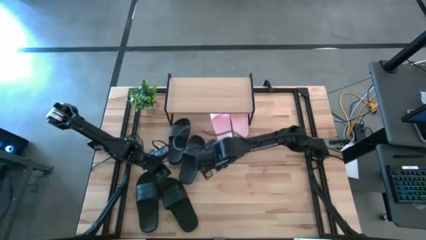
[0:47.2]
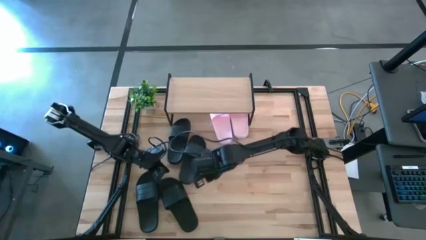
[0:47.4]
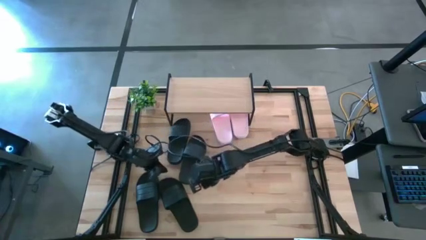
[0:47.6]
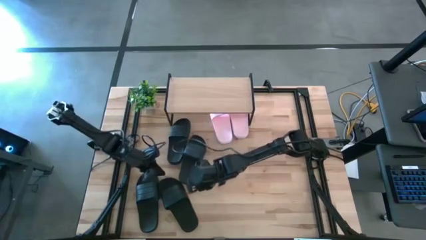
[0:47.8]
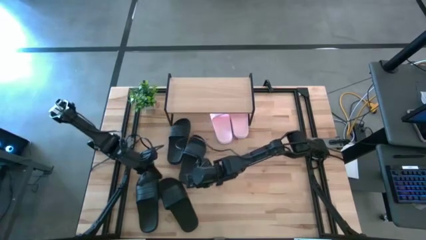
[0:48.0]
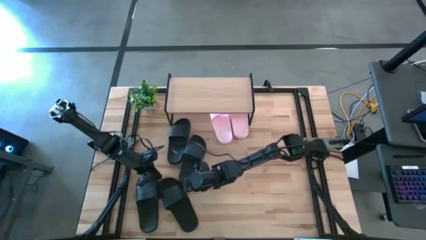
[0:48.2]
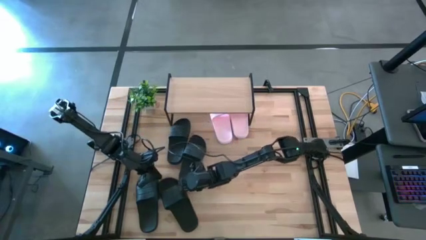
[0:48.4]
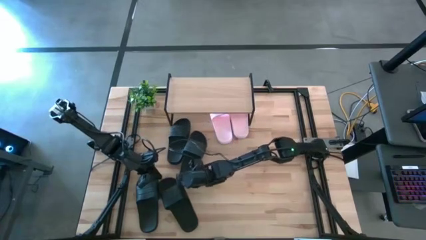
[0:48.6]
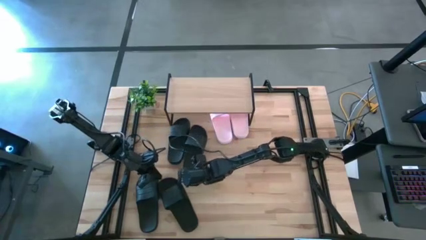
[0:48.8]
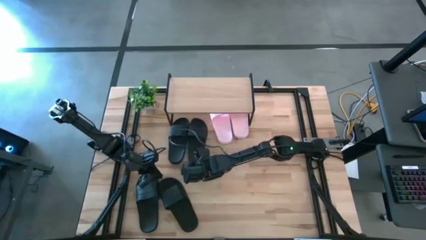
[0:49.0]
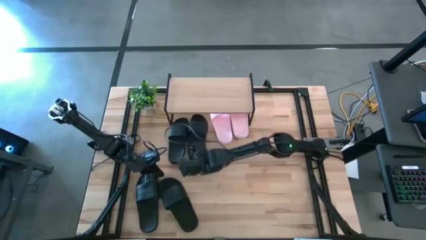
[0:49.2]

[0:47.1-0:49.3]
Task: Pick and place slides into the shelf
Adjust the right black slipper under the shelf

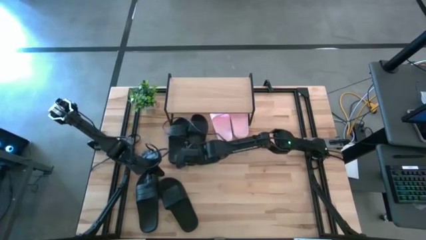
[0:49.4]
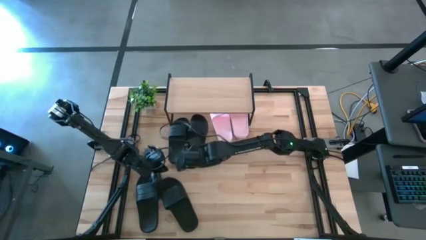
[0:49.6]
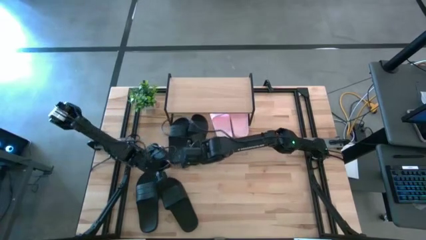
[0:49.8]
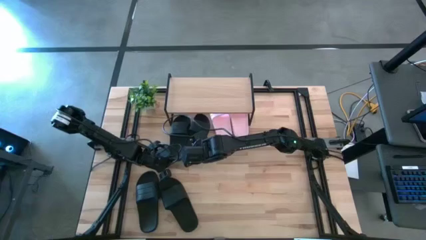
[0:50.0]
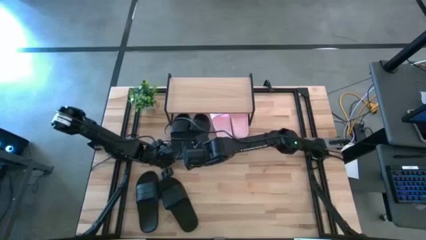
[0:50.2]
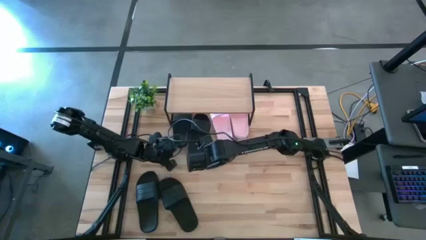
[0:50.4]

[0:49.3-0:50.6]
Adjust the left black slipper under the shelf

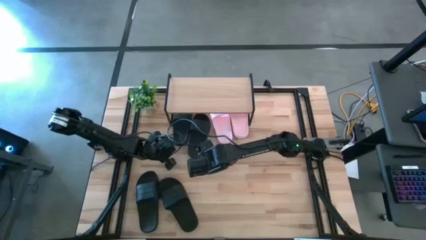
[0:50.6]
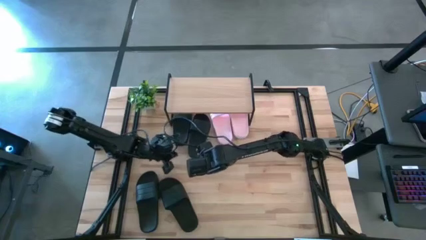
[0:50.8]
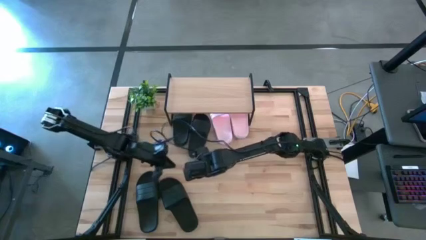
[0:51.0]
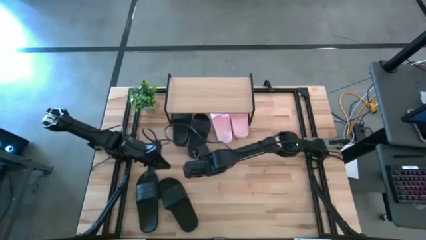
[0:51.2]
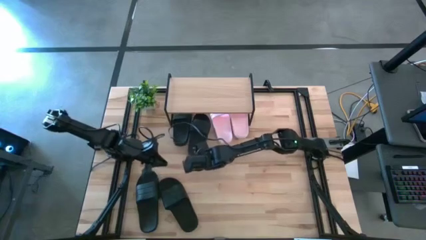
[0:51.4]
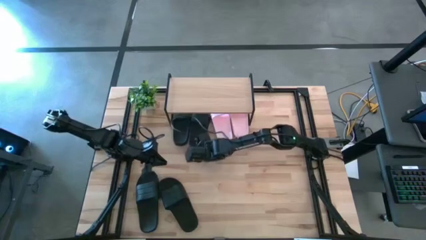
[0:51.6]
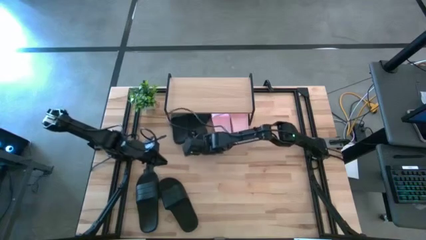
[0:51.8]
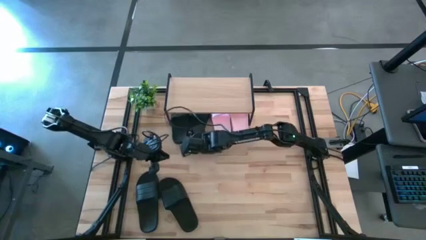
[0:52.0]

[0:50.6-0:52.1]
Adjust the right black slipper under the shelf

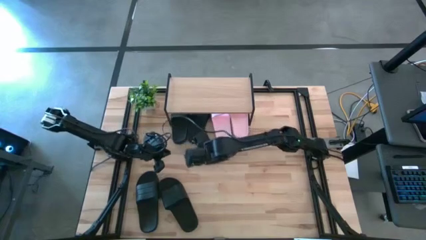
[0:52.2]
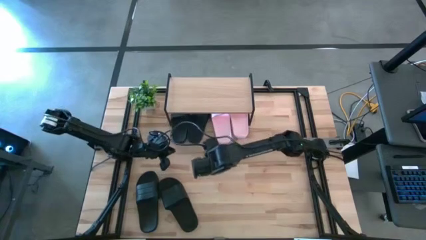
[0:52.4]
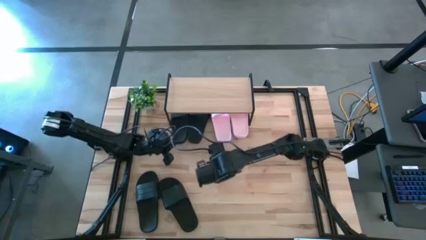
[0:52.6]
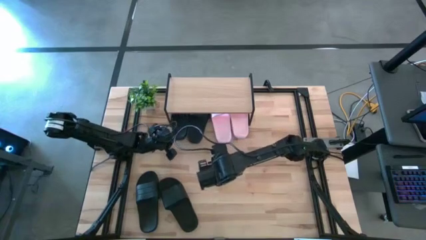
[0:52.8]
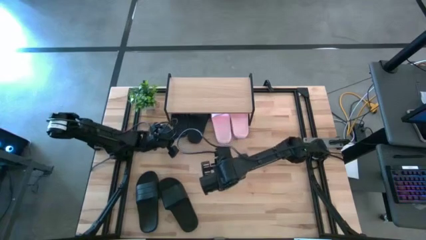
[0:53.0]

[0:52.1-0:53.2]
Adjust the left black slipper under the shelf

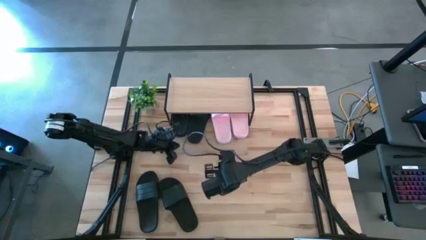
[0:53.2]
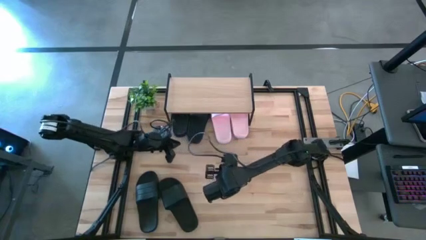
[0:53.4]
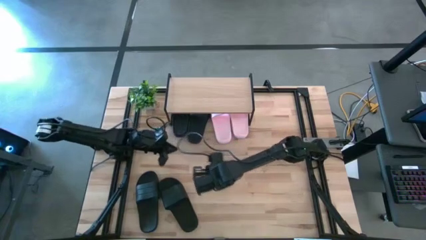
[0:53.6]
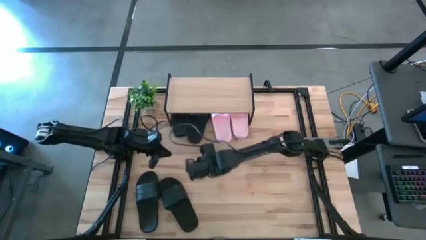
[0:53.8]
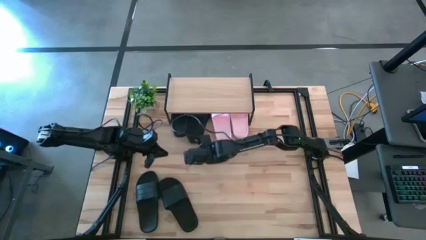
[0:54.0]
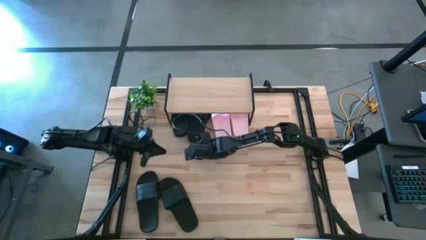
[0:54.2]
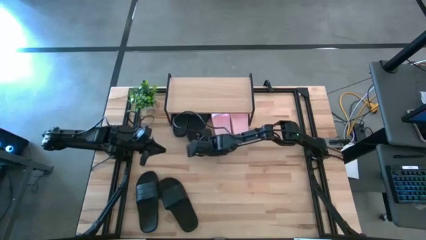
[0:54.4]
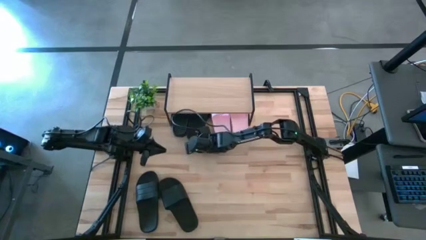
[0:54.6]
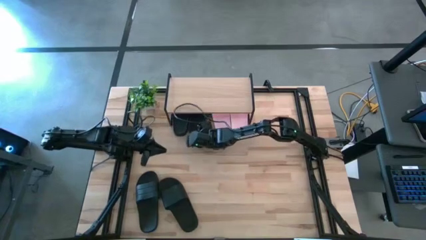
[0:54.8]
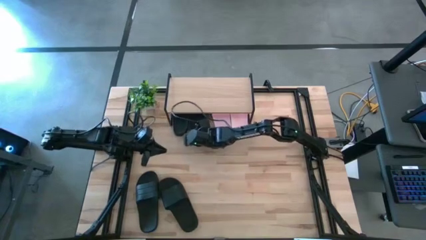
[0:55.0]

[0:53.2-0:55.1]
Adjust the right black slipper under the shelf

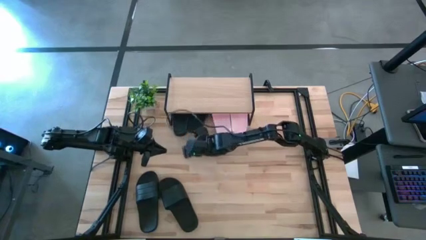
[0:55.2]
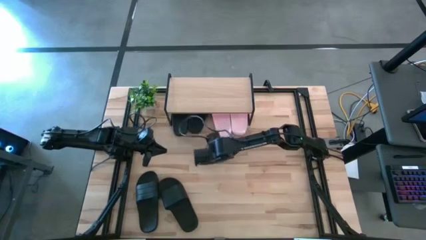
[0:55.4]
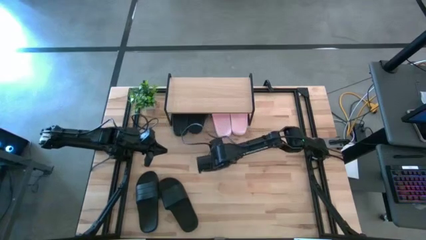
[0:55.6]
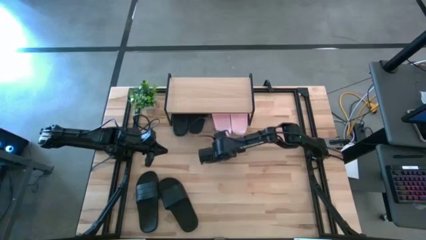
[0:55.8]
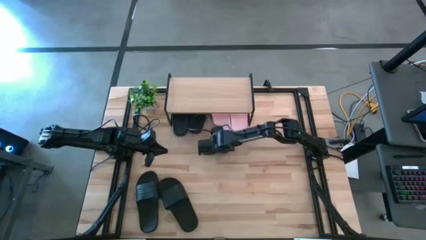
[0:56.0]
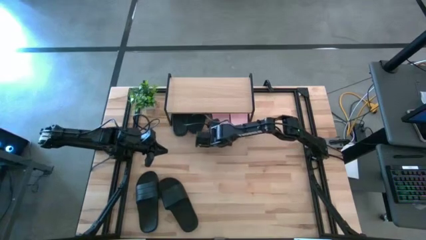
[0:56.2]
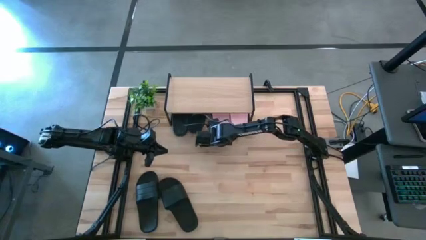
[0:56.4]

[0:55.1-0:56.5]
Adjust the left pink slipper under the shelf

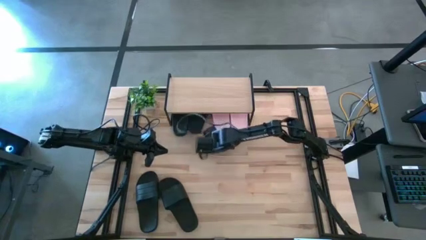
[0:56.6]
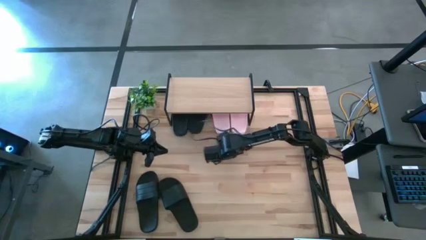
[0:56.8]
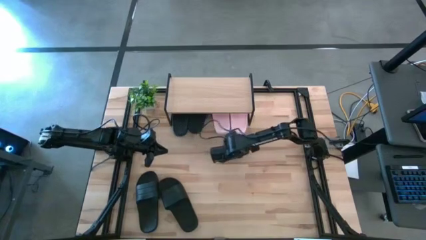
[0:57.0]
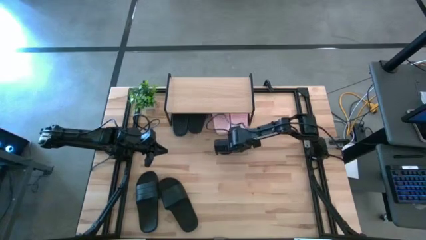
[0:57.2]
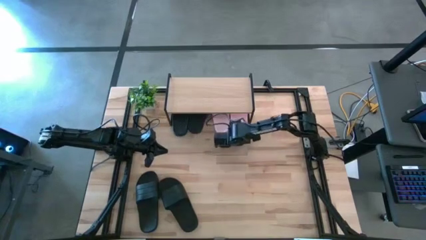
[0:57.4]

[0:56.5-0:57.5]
Adjust the right pink slipper under the shelf
